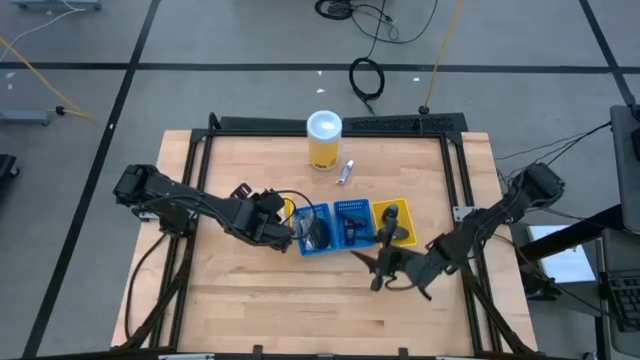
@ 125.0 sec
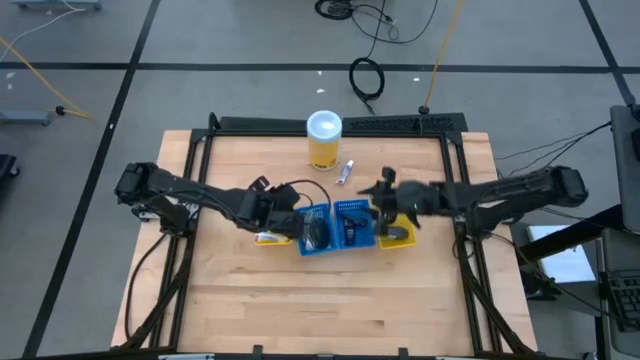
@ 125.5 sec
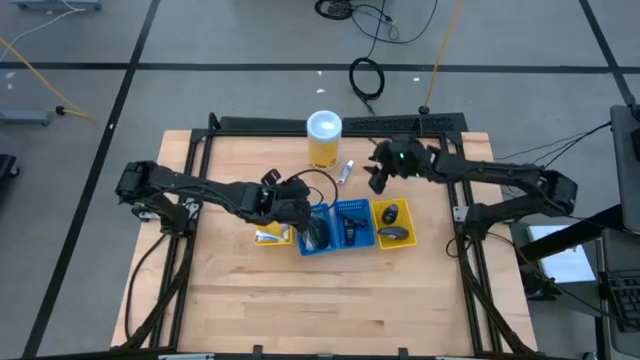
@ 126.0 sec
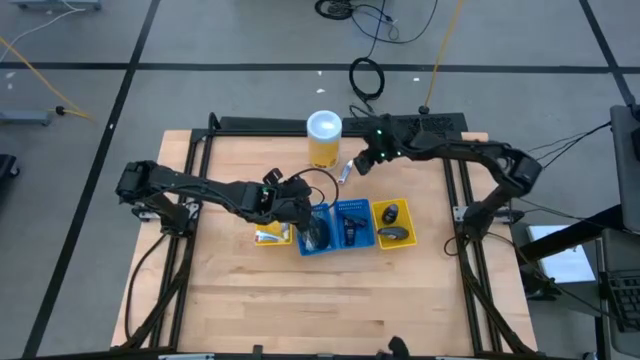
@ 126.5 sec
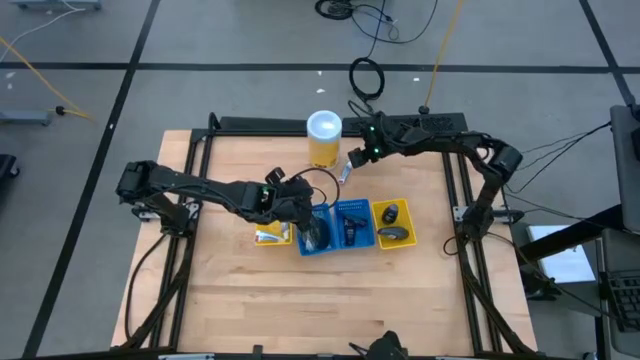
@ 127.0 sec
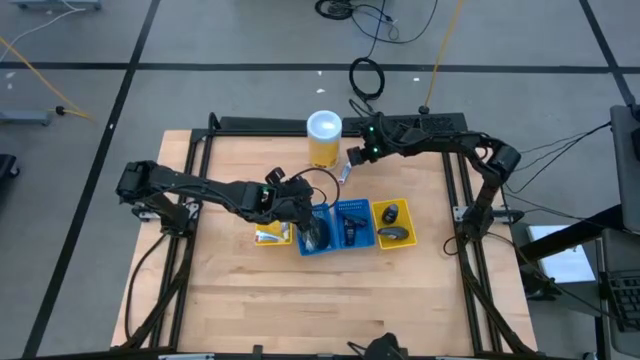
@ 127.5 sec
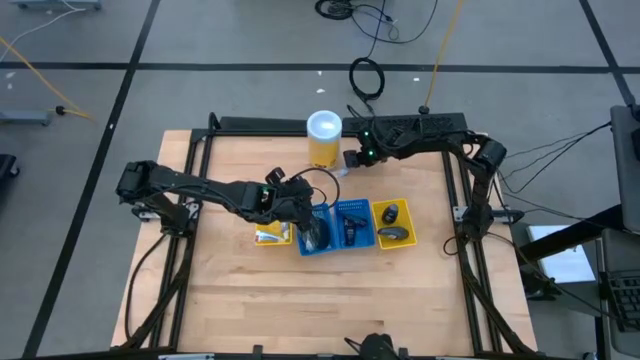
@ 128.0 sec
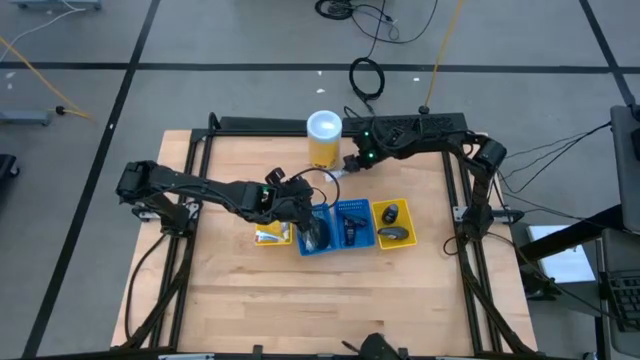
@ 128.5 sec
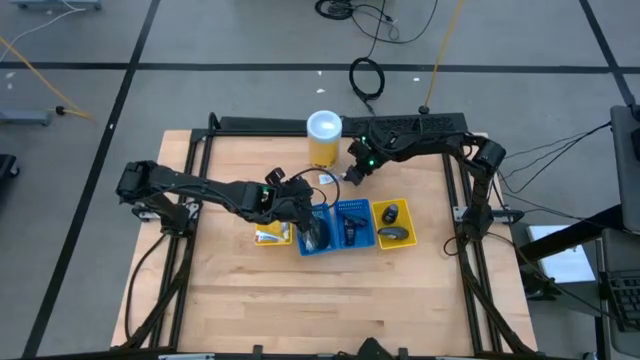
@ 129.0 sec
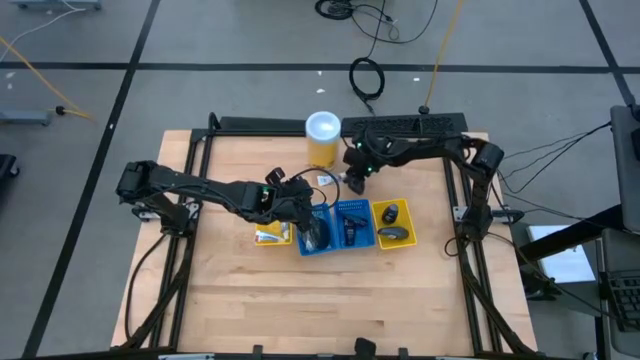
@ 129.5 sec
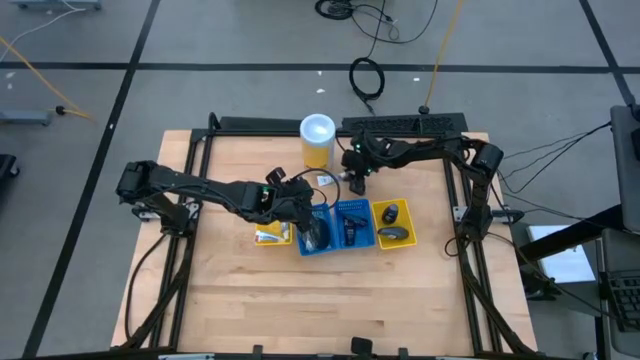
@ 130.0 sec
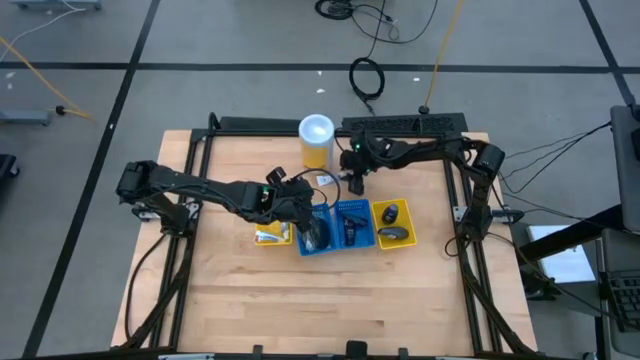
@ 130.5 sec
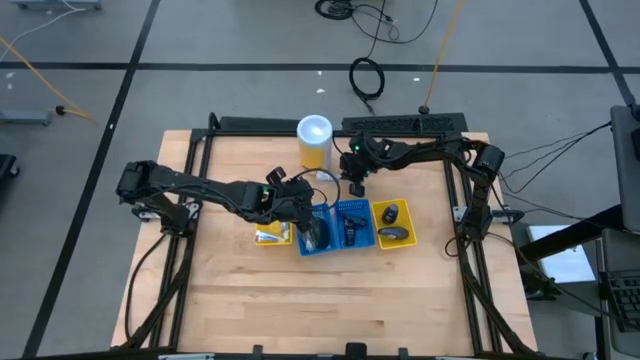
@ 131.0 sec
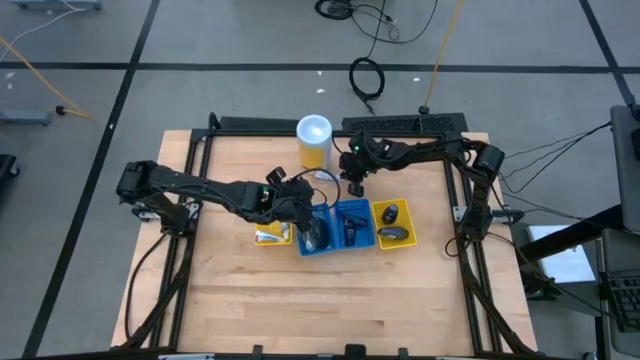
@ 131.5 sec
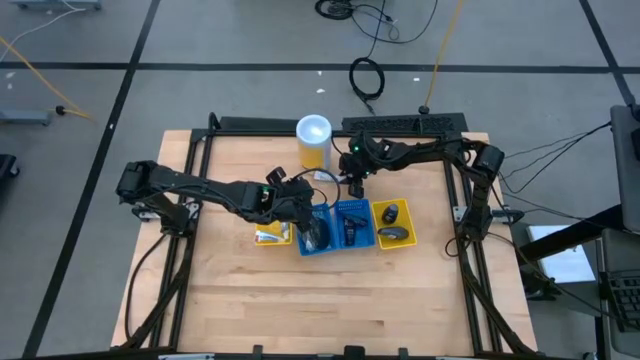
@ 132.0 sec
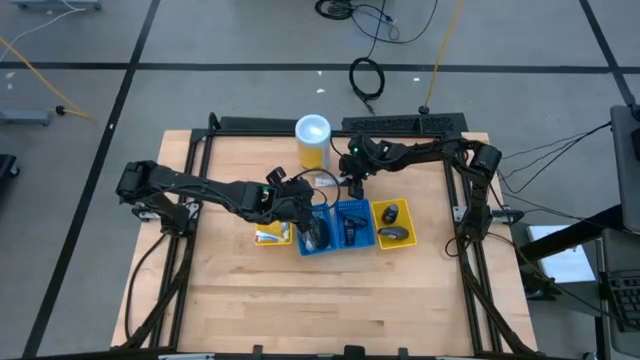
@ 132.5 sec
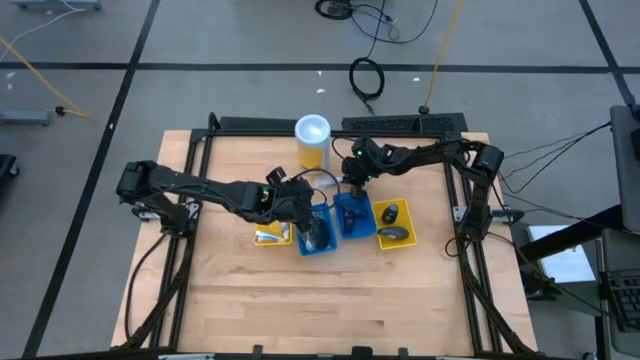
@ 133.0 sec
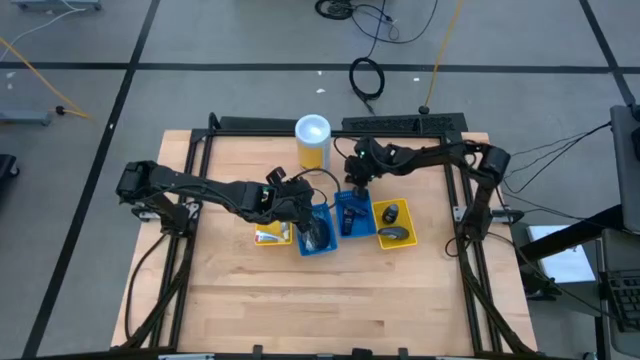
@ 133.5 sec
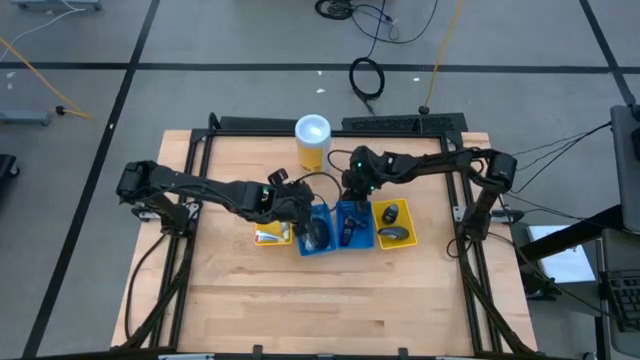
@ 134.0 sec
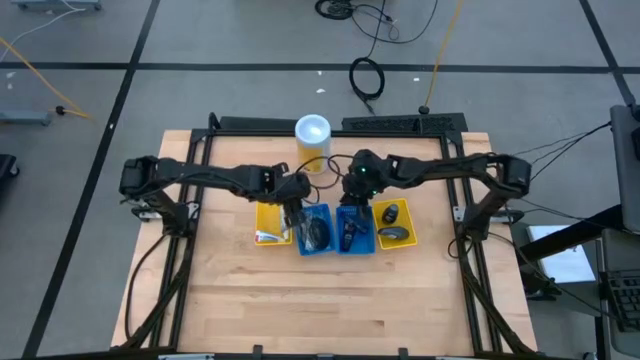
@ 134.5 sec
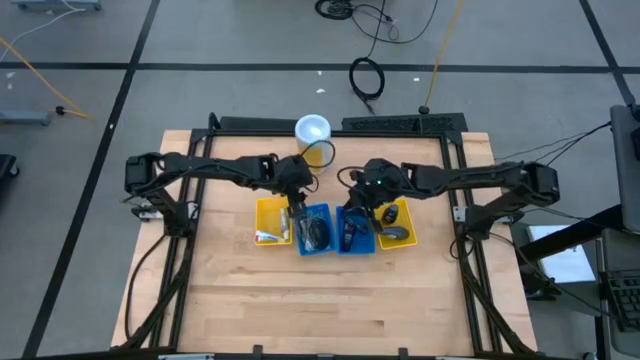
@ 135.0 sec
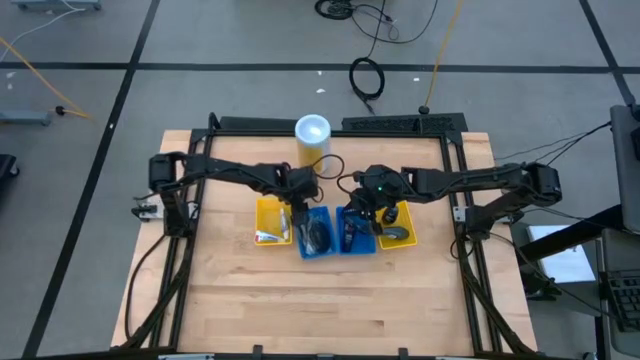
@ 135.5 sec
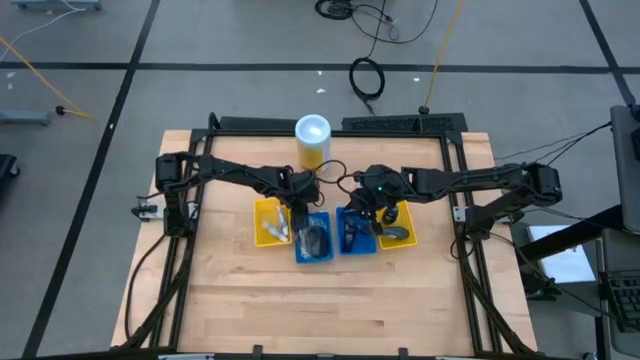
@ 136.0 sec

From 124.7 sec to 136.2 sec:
Task: Pick & Place Travel size toiletries
Put the white toothpaste into the left yellow bin

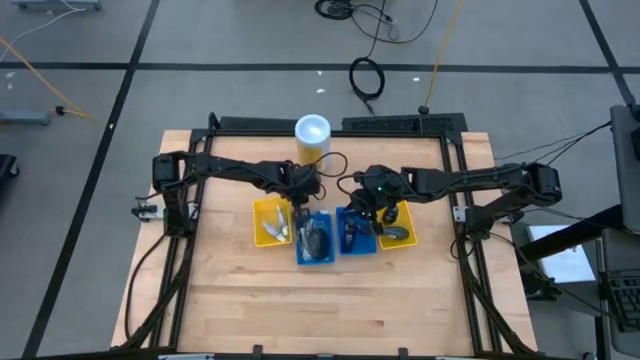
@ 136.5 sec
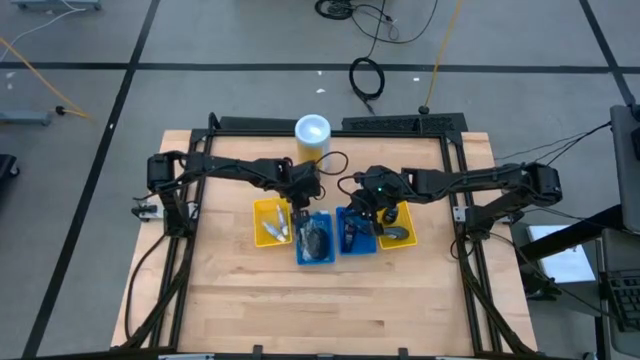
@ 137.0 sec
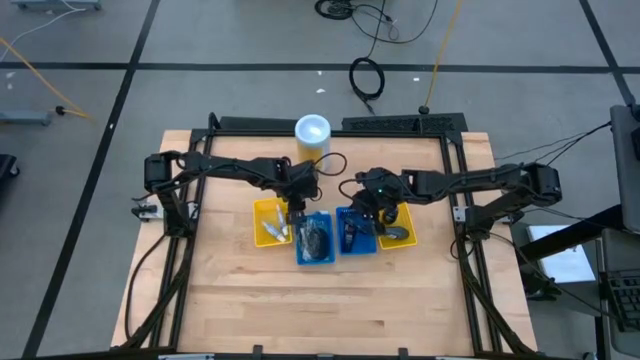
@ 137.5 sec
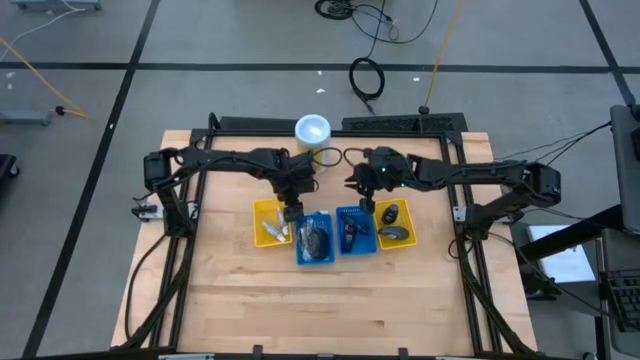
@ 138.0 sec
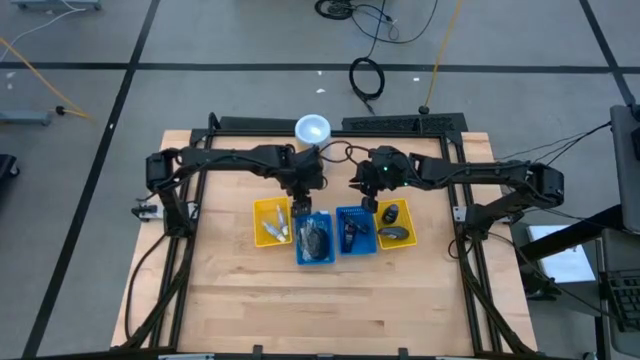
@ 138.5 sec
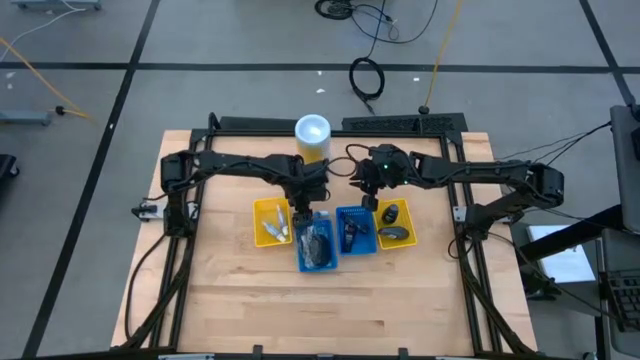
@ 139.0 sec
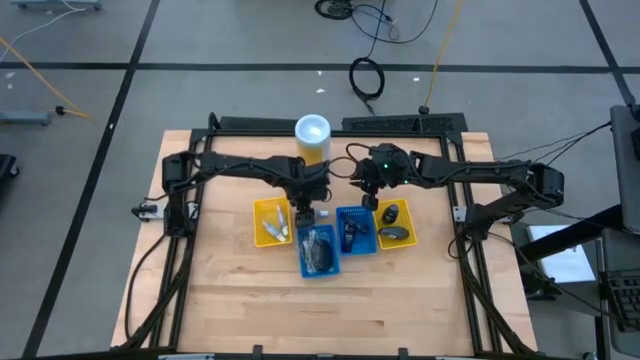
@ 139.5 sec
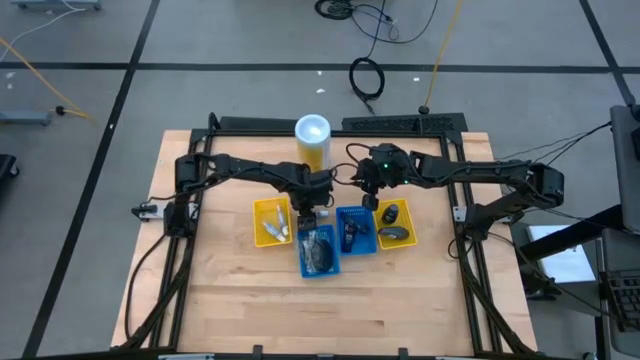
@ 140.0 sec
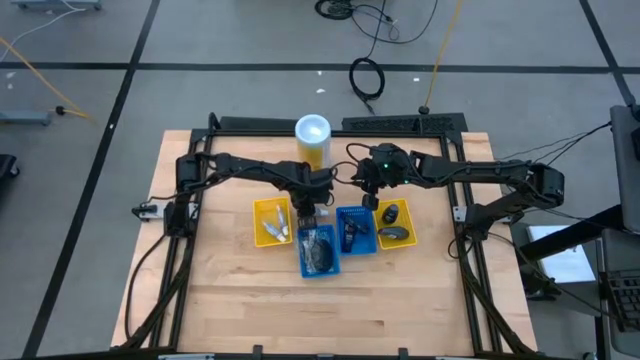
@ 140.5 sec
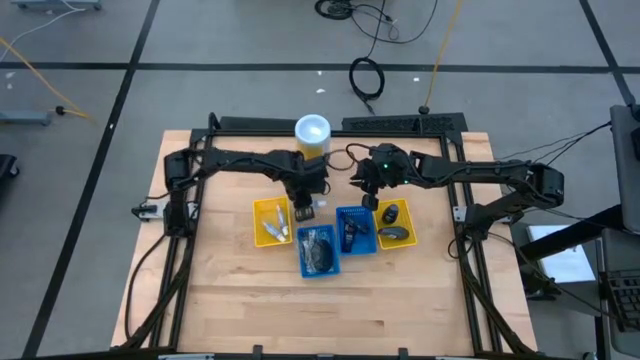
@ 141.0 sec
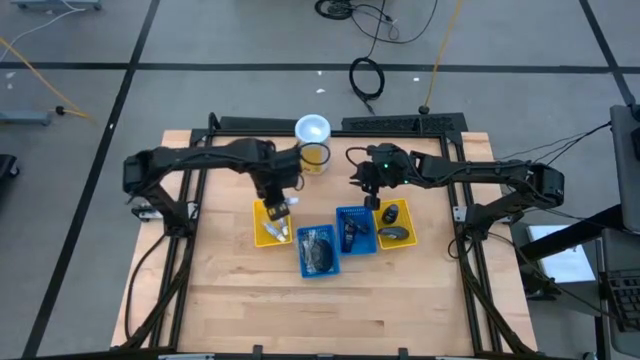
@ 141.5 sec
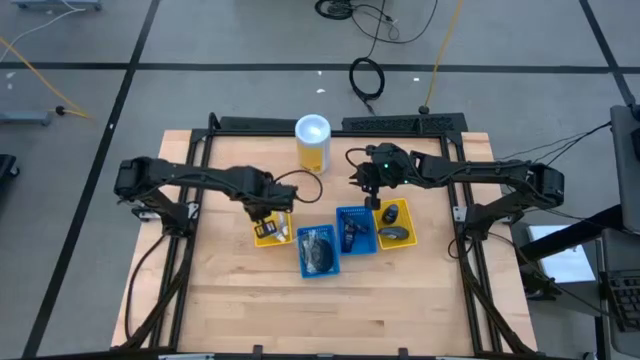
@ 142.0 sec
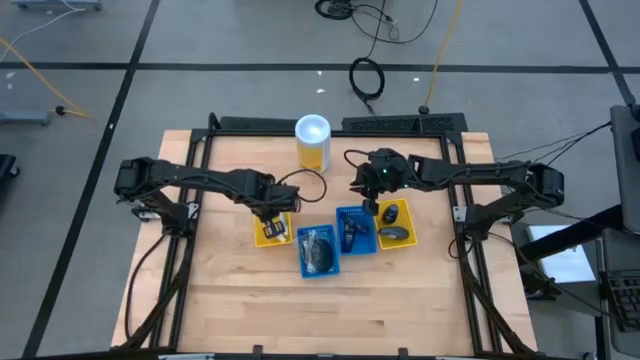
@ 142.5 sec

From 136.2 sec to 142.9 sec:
Put the white toothpaste into the left yellow bin

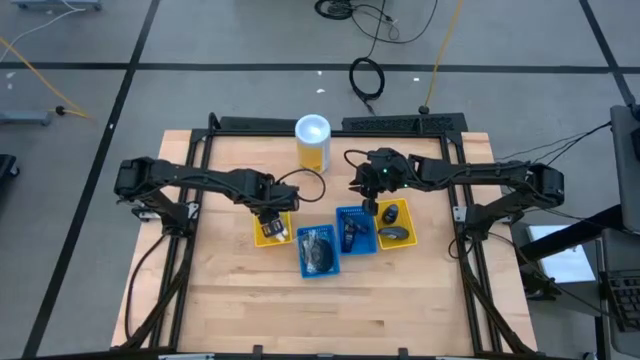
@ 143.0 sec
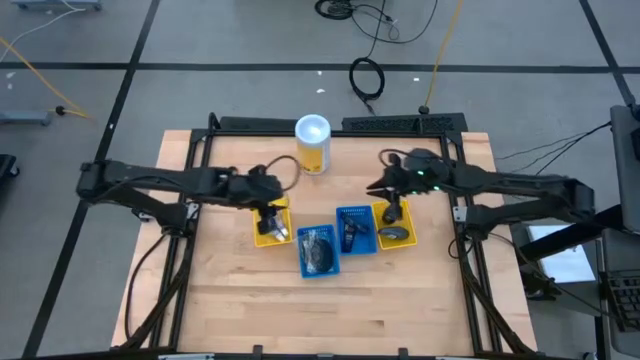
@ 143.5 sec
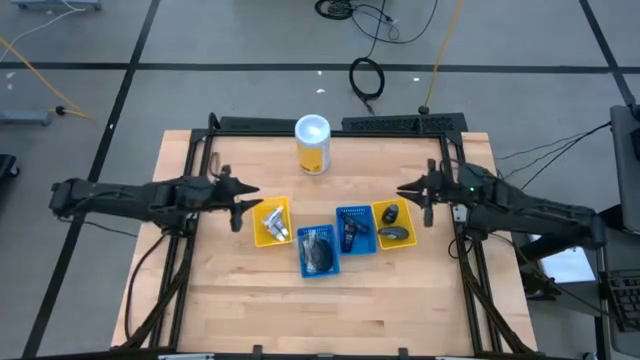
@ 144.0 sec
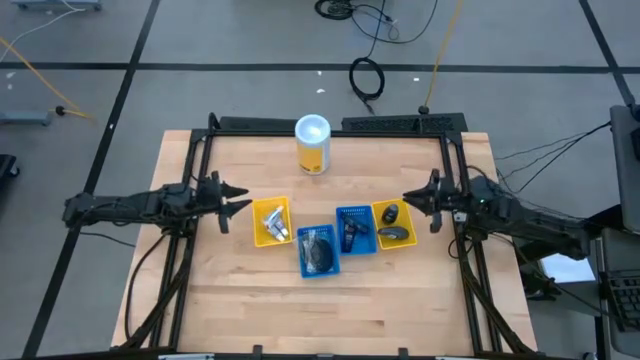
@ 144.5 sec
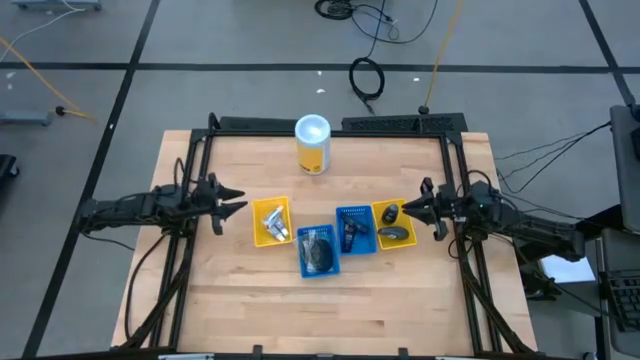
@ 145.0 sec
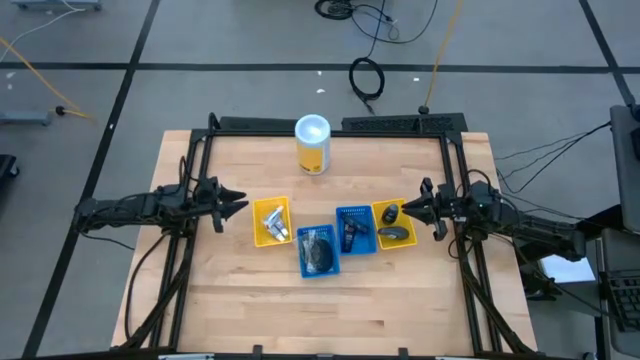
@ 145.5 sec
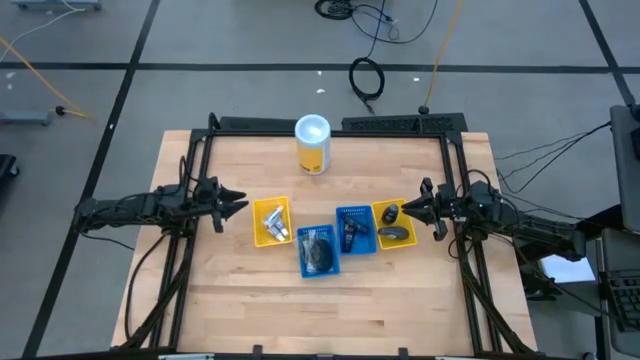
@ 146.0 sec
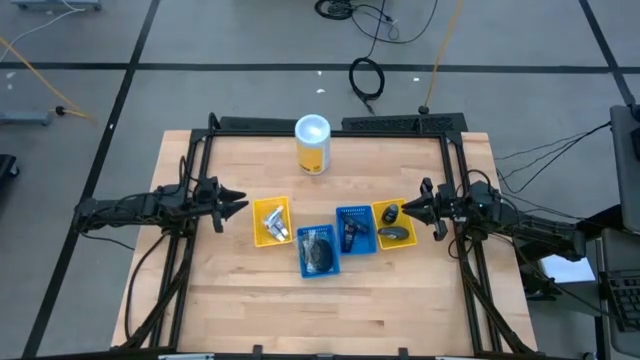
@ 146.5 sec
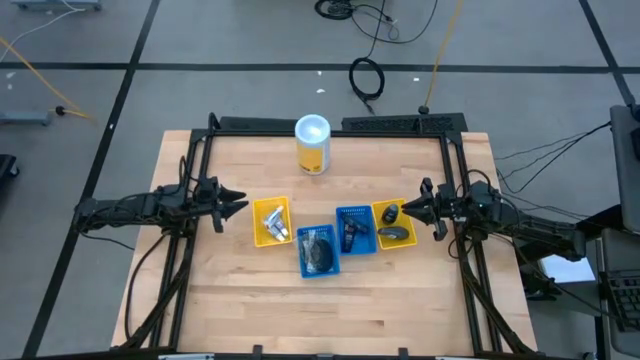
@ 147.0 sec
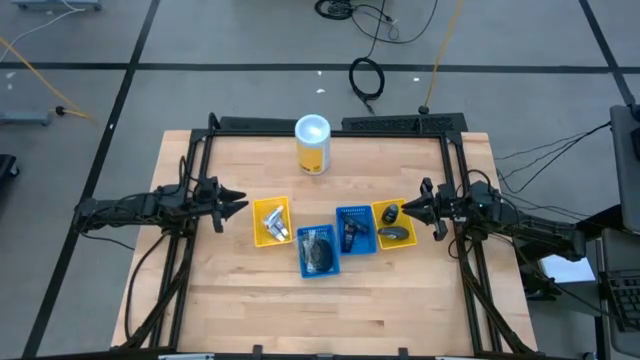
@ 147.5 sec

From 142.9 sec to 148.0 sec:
Return to Home Position
